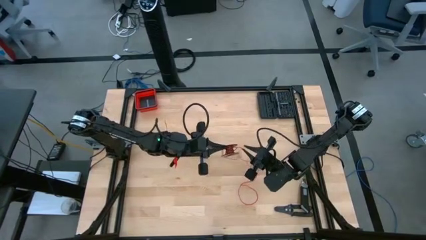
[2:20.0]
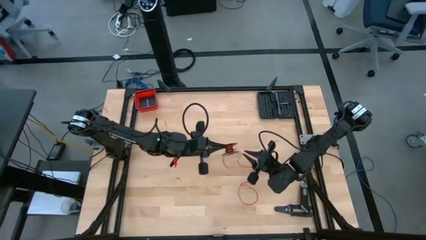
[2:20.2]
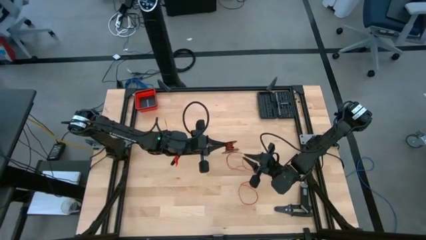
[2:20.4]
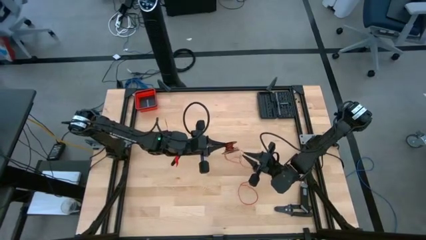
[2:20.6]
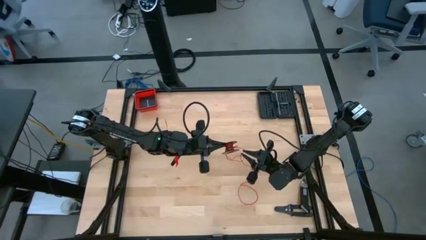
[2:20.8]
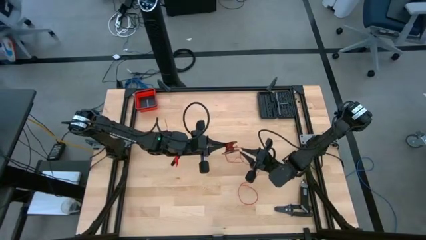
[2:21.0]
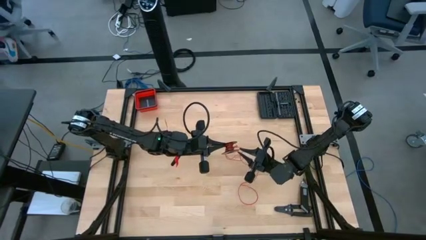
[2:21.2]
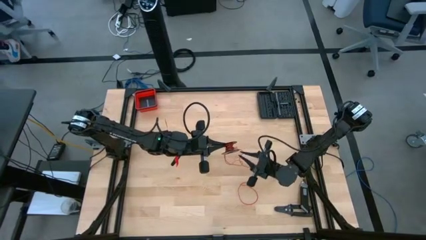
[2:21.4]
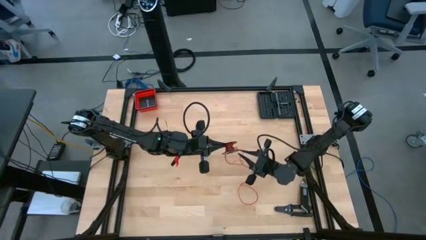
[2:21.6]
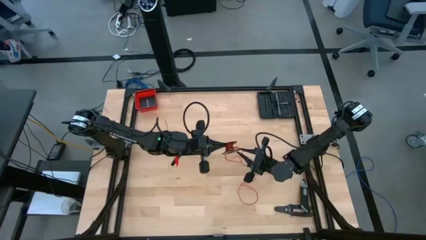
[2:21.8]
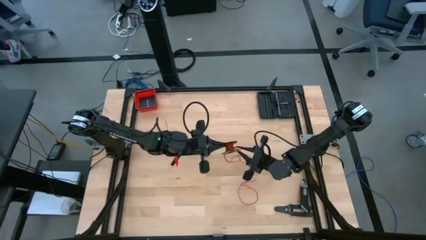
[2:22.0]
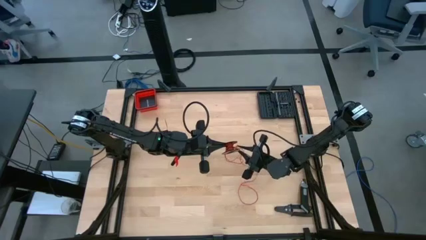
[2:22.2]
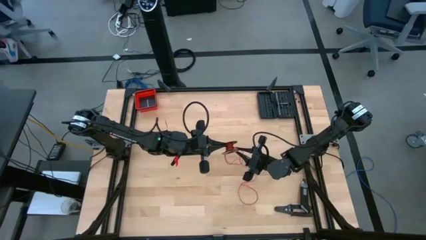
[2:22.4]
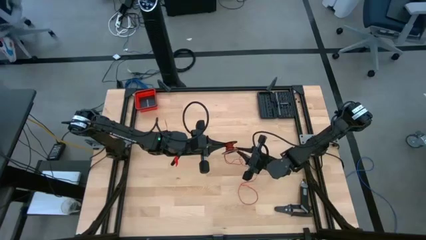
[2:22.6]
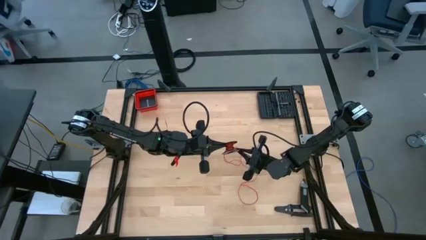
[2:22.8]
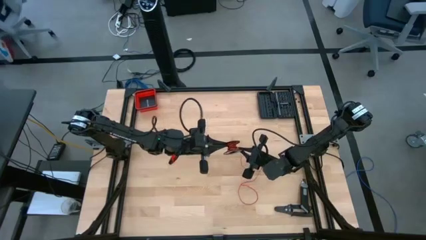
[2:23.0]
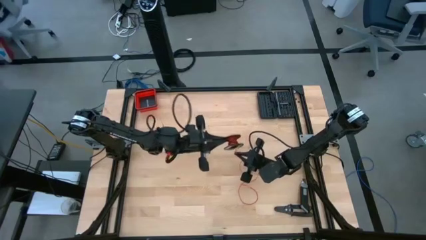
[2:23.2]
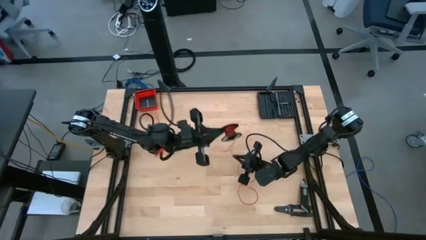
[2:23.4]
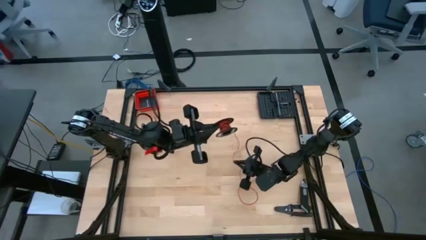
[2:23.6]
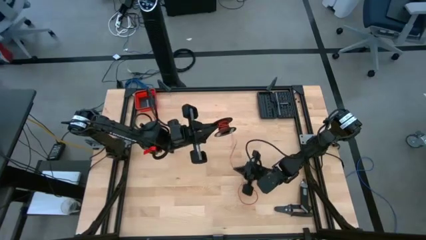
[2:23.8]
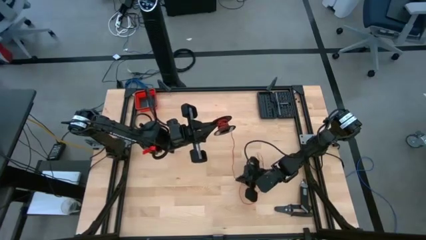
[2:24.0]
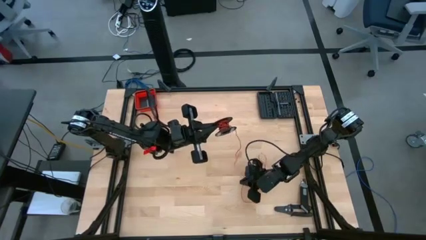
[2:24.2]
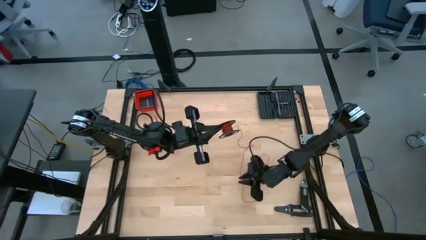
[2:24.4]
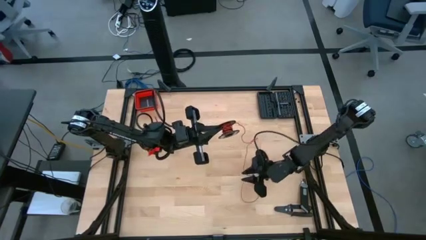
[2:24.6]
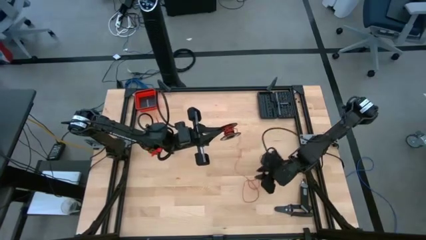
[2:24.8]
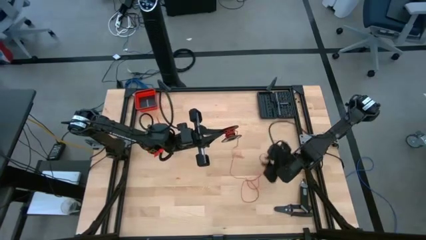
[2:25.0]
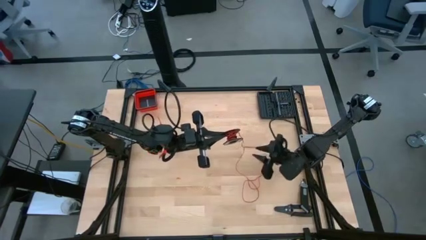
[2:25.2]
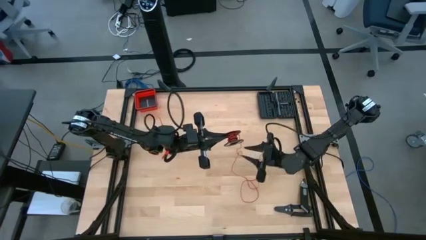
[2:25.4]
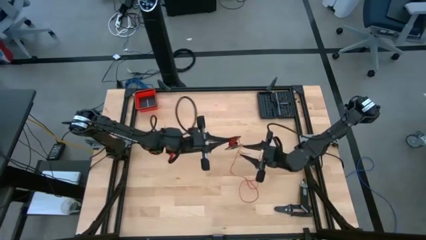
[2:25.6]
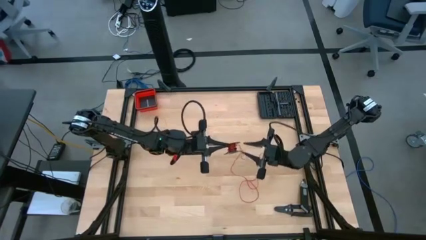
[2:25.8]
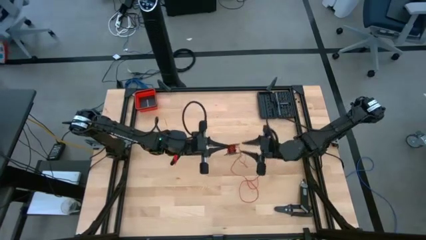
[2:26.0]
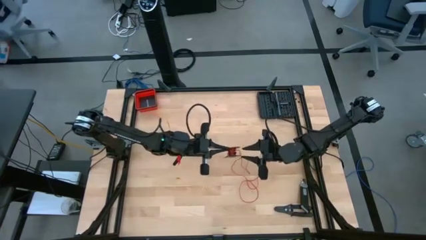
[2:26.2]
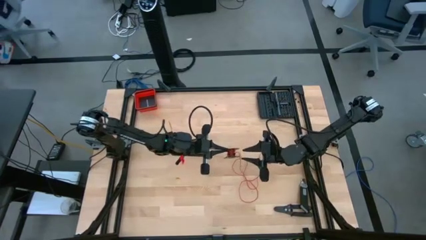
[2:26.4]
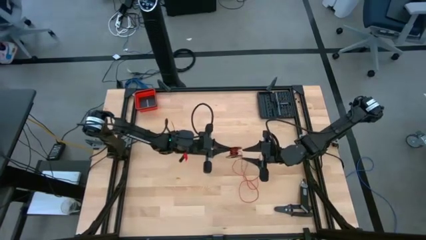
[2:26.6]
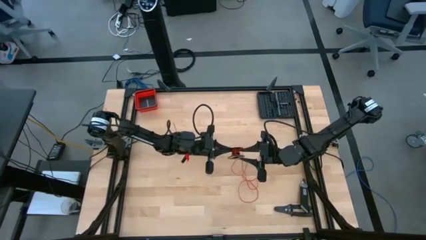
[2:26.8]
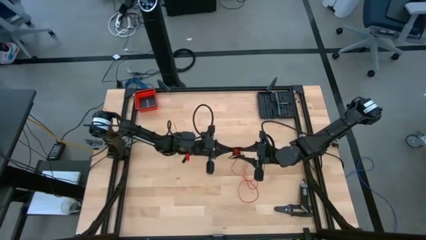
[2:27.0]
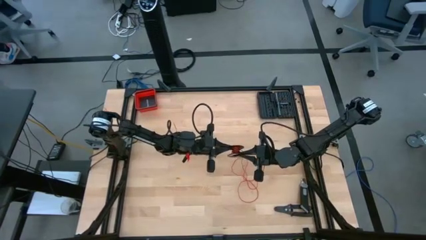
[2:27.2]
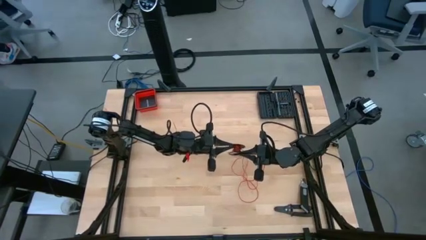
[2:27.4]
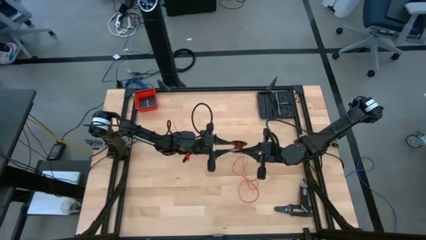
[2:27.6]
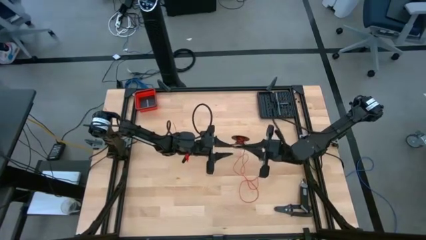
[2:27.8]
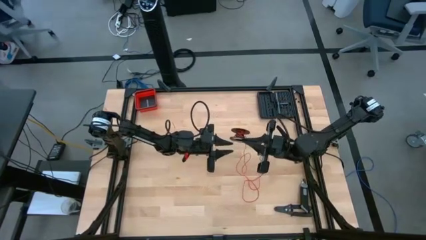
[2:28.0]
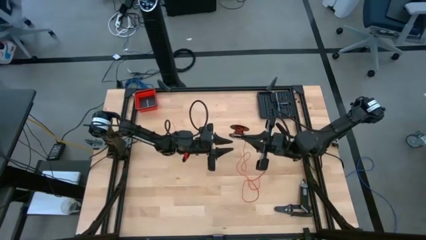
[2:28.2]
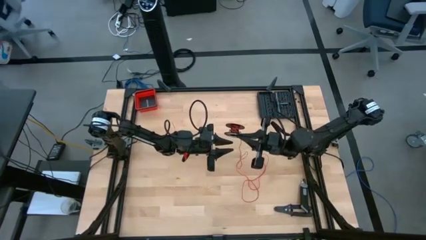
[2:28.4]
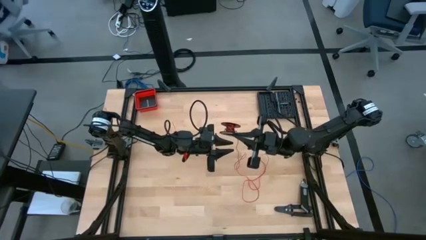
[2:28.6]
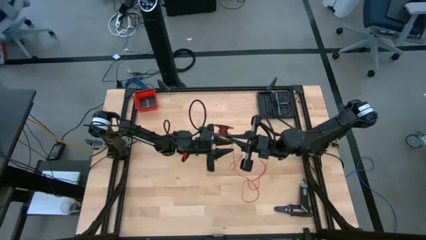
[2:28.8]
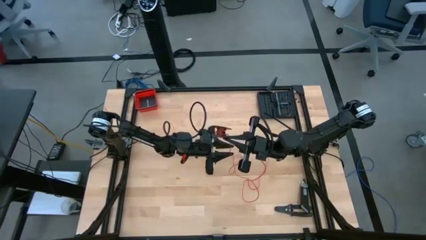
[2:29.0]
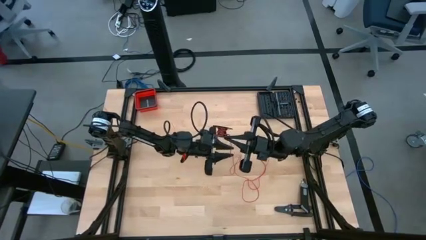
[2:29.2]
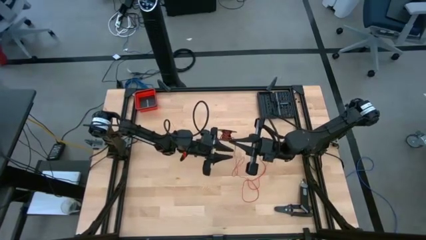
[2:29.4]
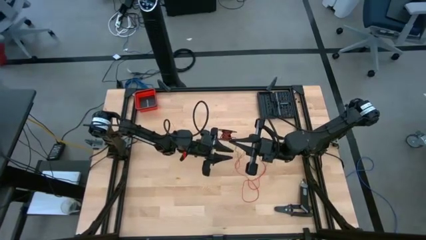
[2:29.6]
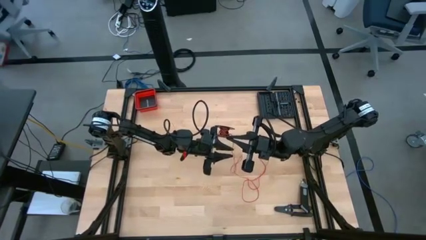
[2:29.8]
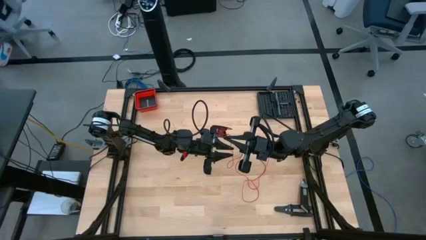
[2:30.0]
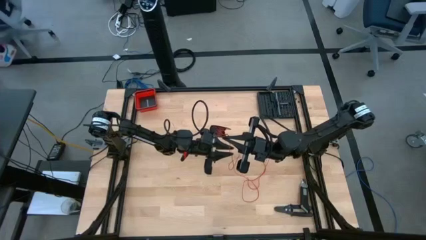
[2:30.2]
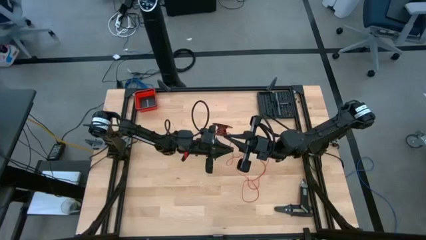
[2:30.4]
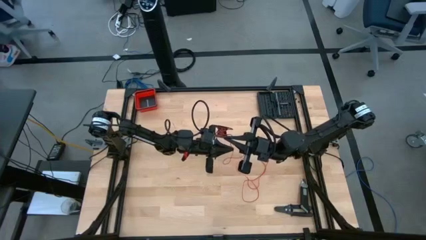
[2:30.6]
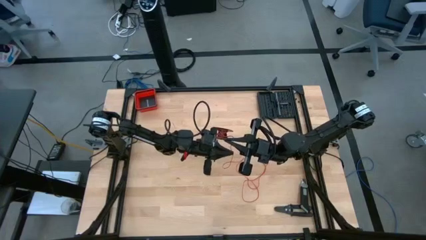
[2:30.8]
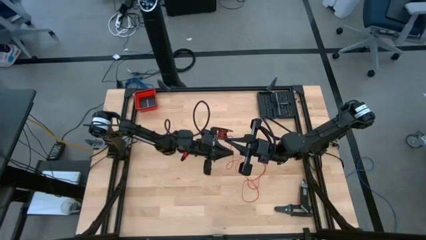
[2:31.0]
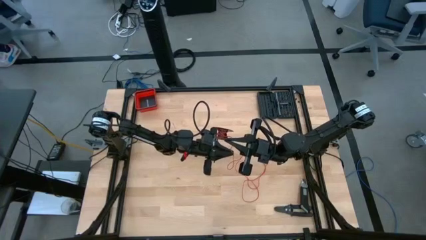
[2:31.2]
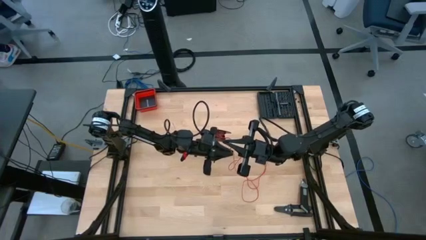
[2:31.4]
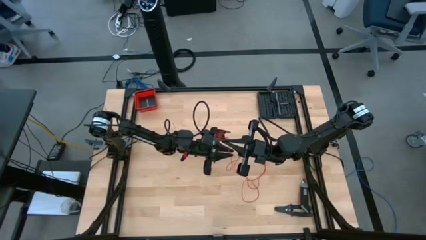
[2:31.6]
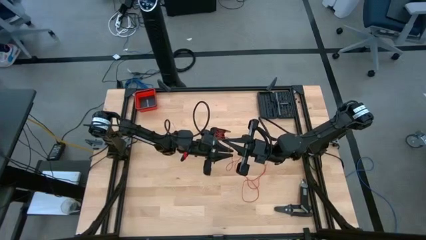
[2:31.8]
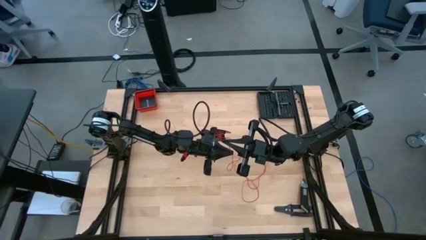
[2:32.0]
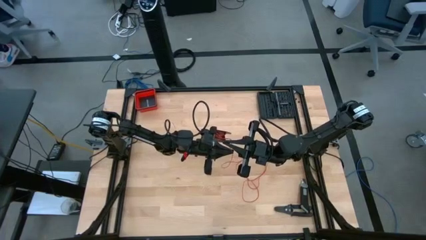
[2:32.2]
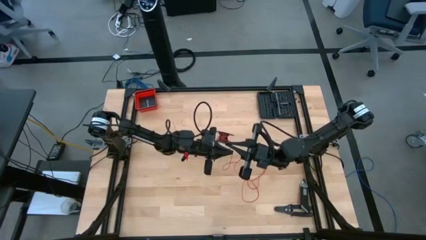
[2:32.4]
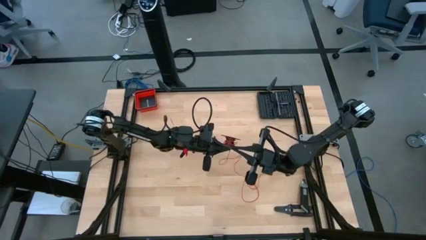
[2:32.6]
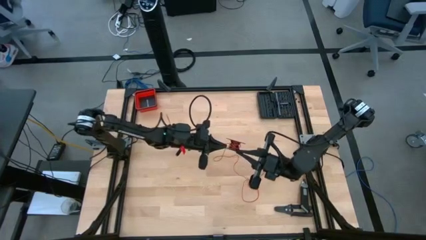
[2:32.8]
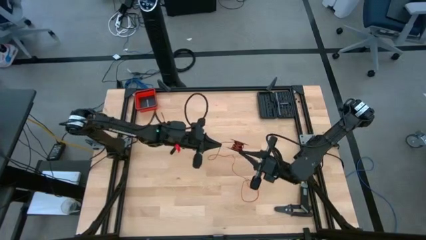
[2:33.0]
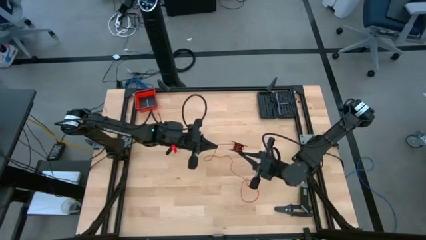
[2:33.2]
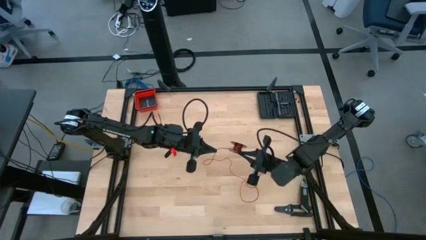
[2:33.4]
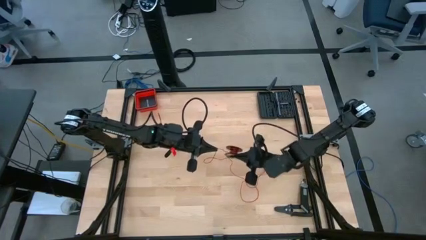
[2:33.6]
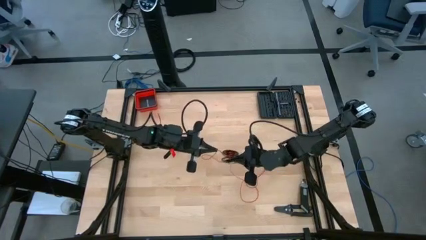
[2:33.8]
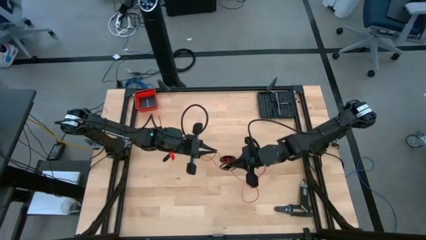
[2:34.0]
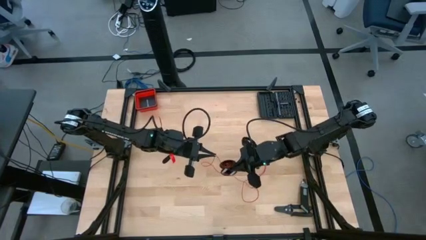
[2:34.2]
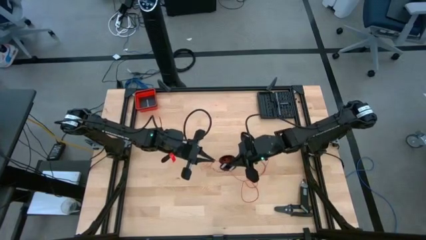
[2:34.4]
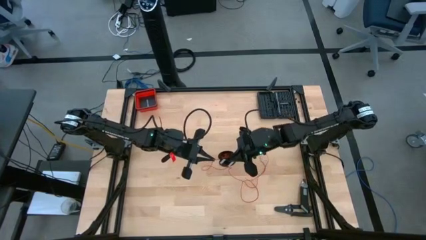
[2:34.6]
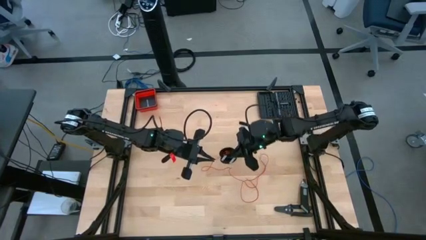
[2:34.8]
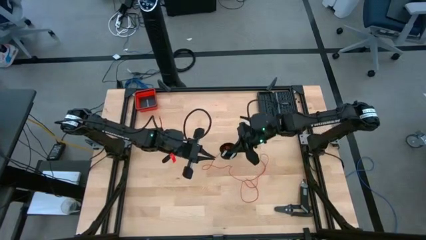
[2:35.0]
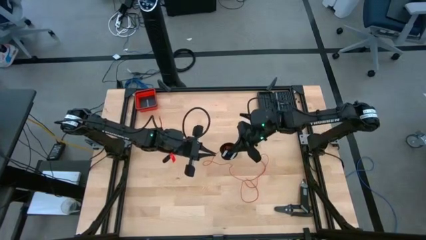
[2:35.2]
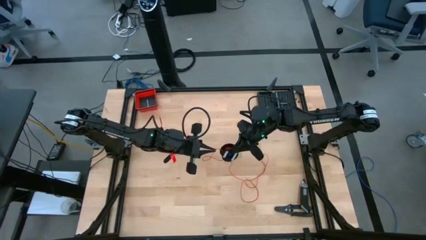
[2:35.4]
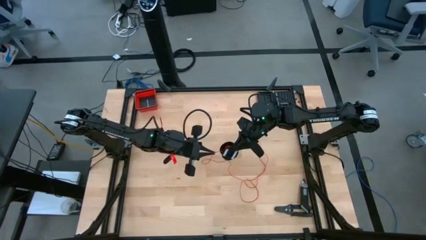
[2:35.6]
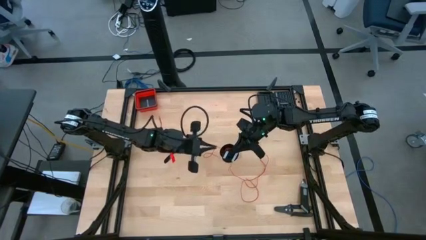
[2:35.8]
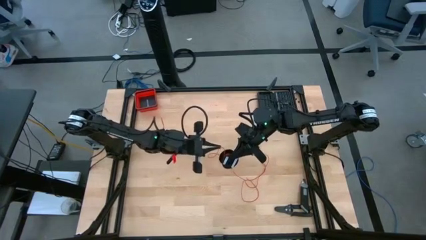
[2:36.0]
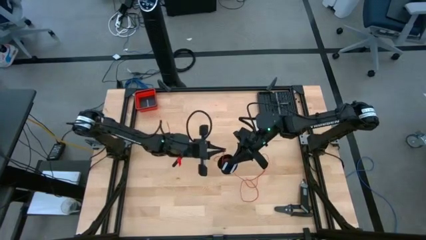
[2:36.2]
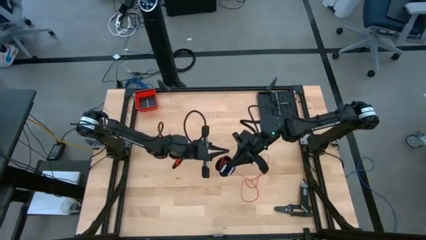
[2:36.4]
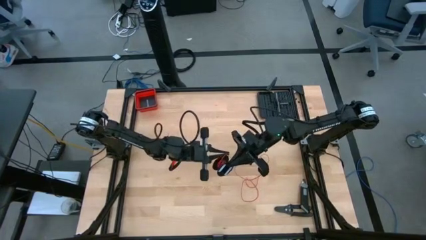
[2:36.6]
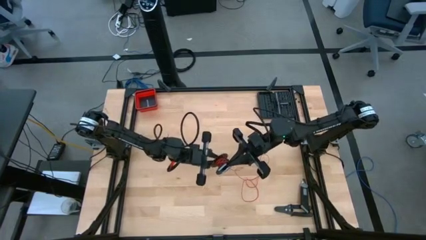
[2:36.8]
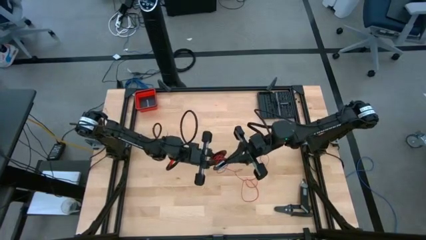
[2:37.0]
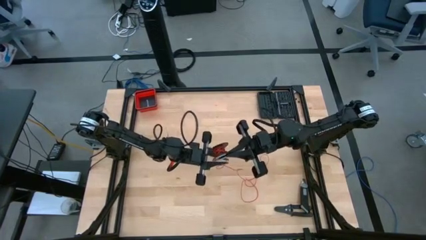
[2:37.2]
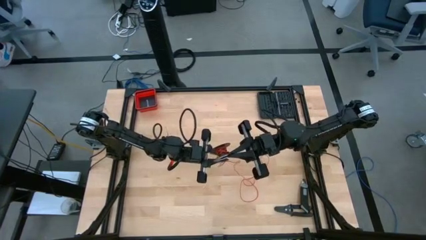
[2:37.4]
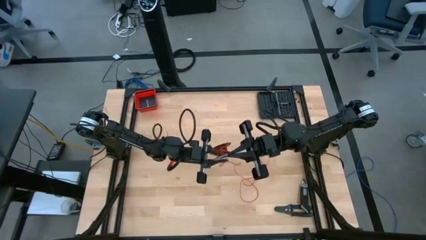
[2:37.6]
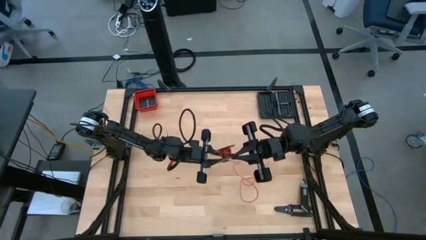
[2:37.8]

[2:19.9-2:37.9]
Task: Coil cords
Coil the red wire onto the spool
